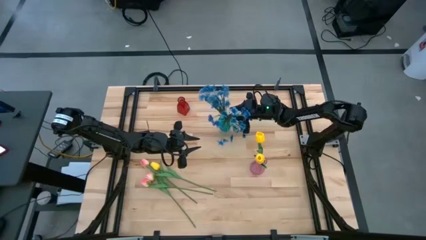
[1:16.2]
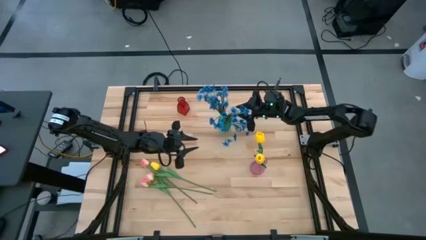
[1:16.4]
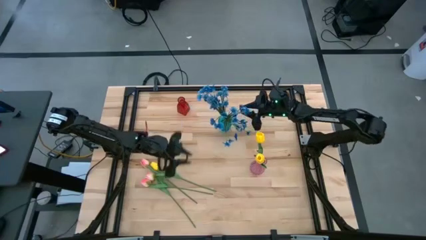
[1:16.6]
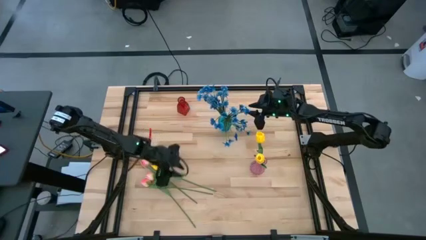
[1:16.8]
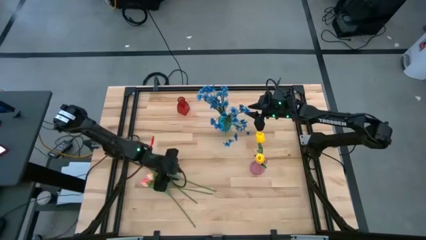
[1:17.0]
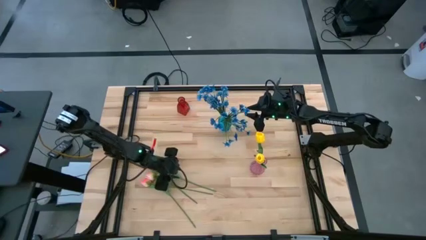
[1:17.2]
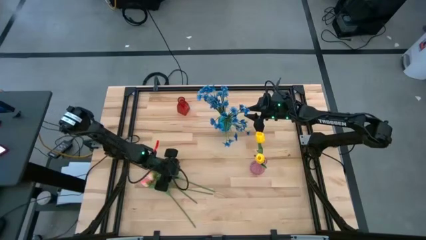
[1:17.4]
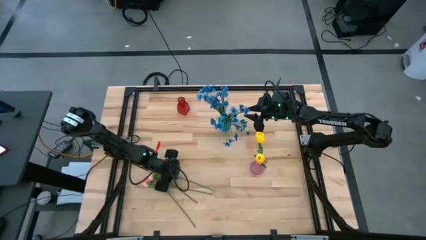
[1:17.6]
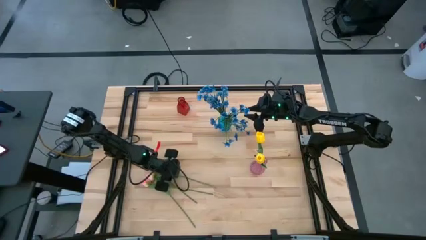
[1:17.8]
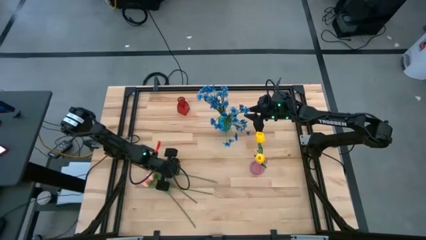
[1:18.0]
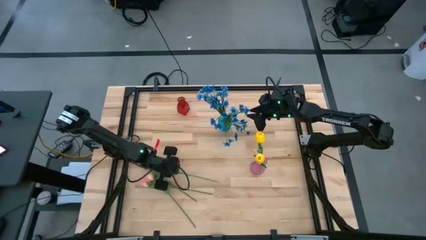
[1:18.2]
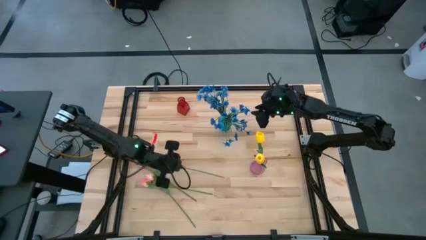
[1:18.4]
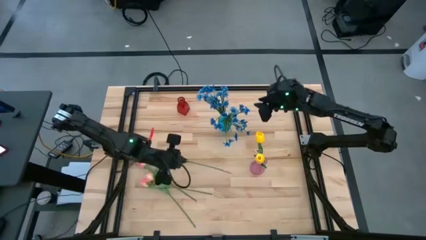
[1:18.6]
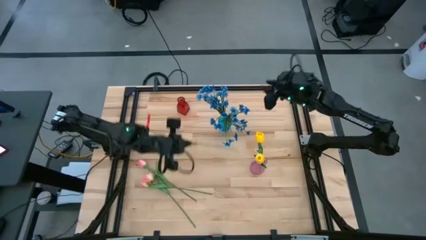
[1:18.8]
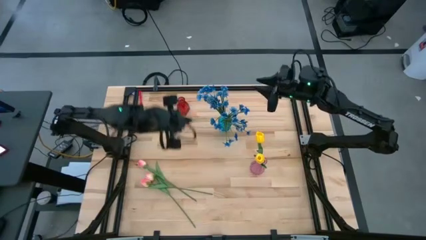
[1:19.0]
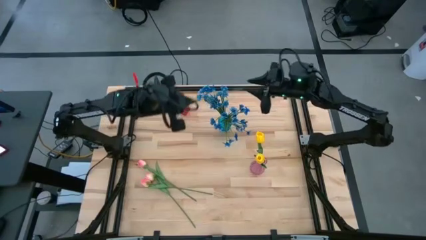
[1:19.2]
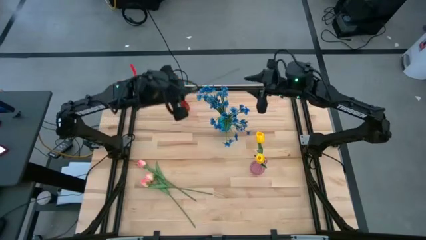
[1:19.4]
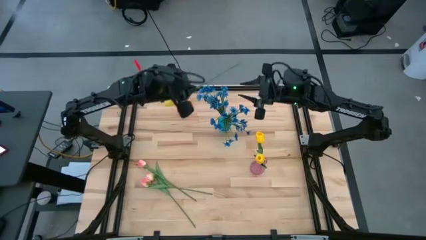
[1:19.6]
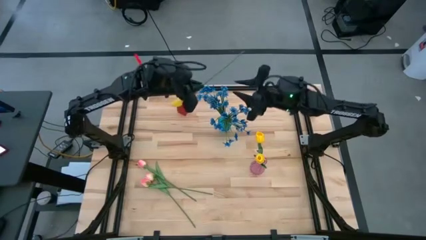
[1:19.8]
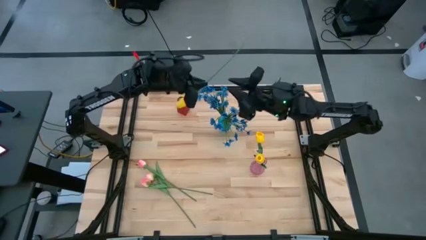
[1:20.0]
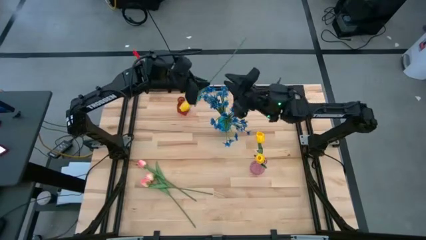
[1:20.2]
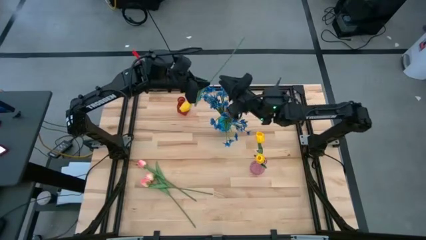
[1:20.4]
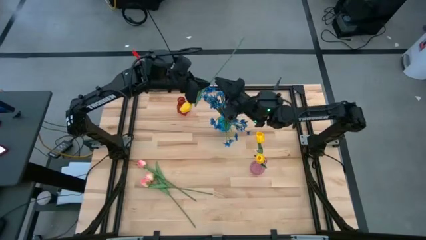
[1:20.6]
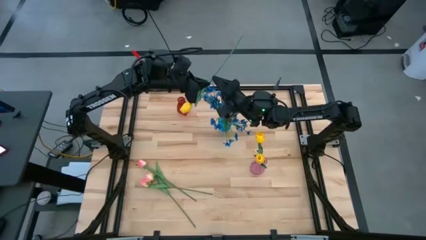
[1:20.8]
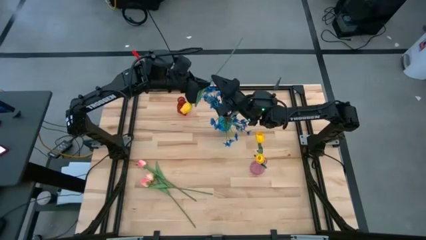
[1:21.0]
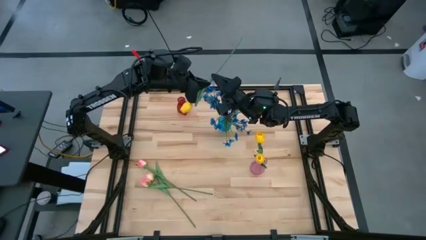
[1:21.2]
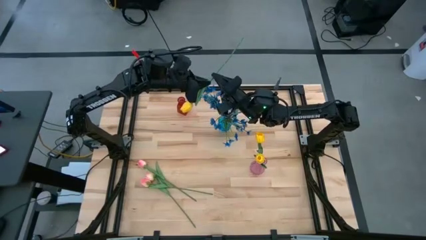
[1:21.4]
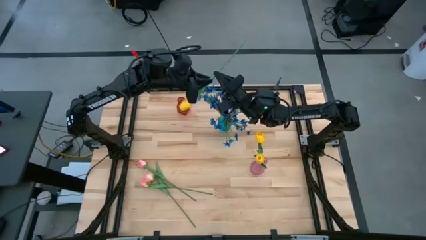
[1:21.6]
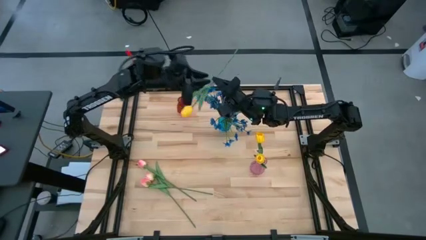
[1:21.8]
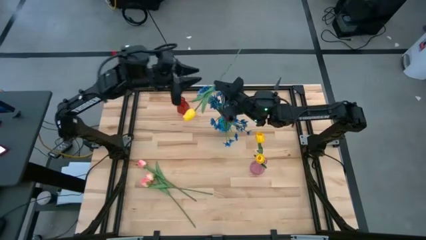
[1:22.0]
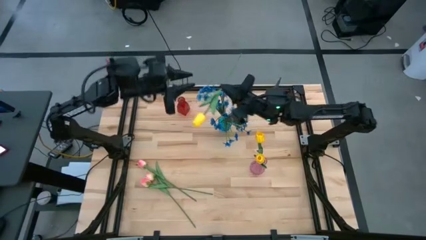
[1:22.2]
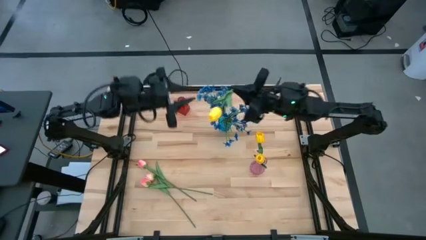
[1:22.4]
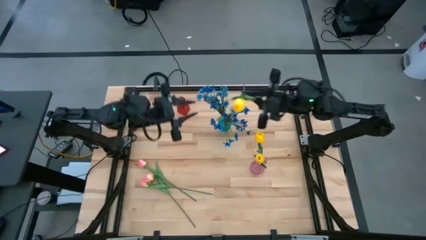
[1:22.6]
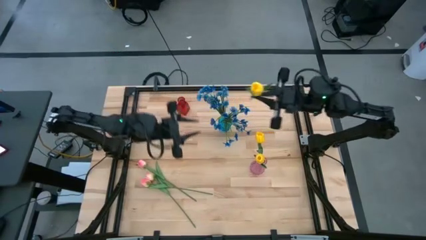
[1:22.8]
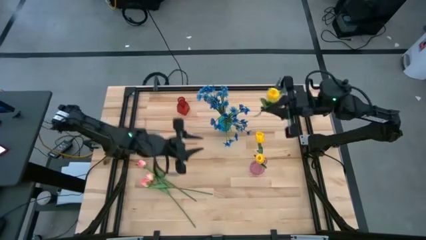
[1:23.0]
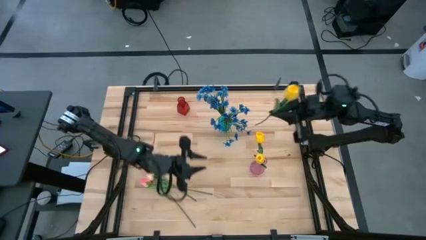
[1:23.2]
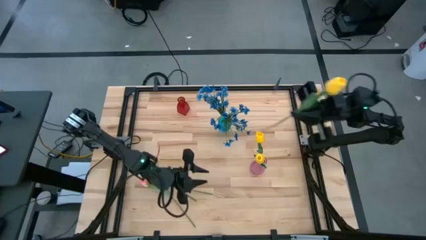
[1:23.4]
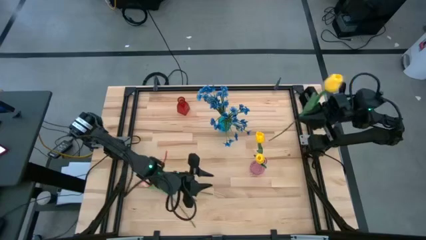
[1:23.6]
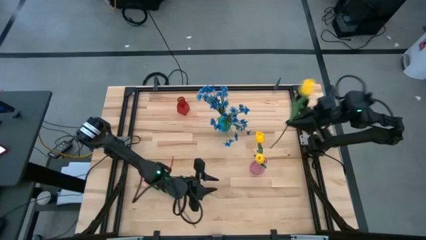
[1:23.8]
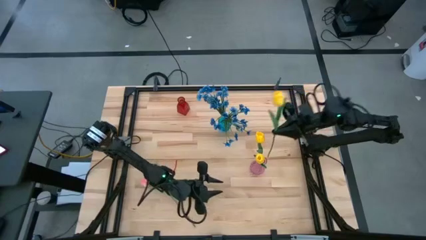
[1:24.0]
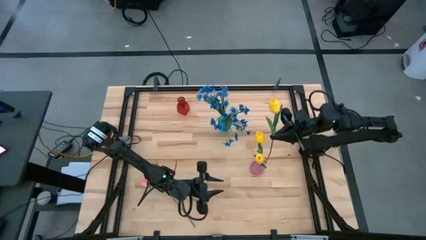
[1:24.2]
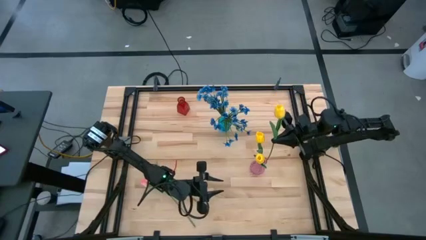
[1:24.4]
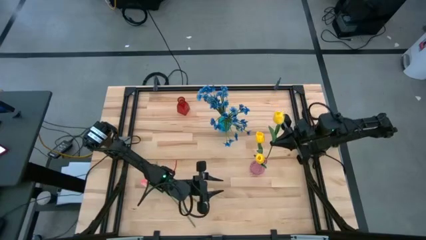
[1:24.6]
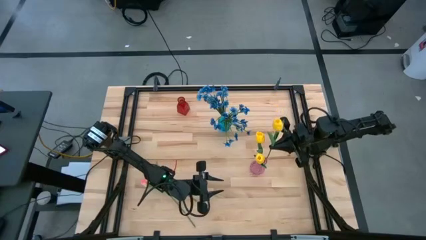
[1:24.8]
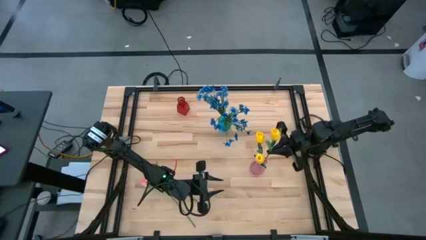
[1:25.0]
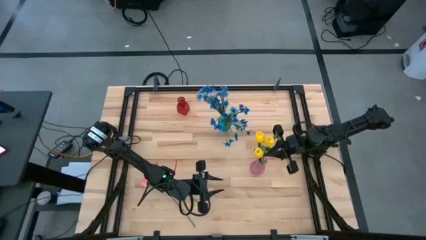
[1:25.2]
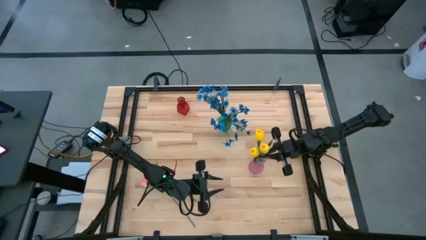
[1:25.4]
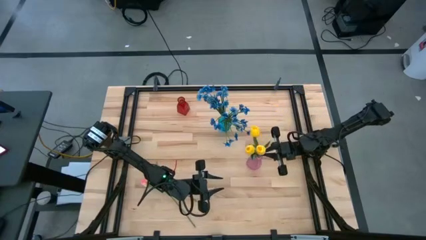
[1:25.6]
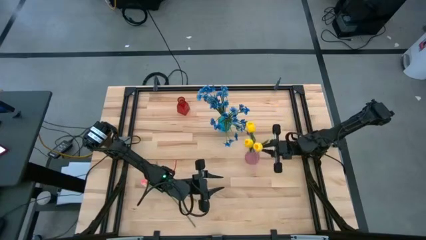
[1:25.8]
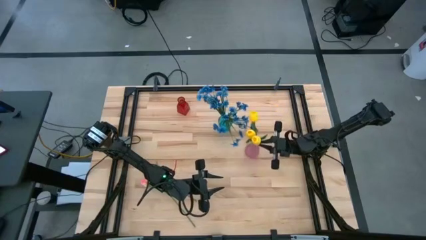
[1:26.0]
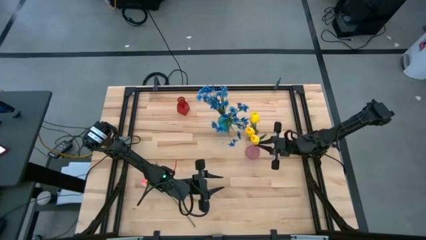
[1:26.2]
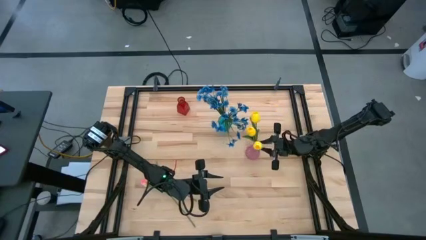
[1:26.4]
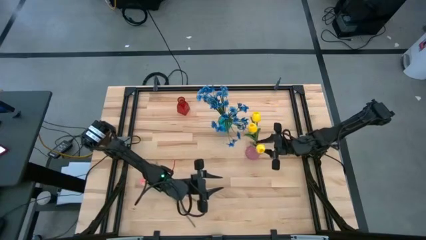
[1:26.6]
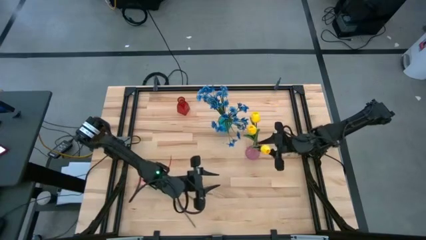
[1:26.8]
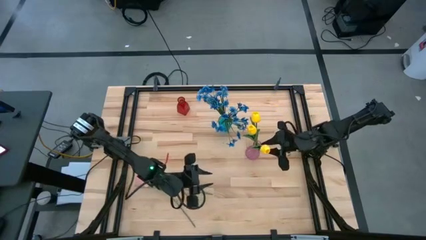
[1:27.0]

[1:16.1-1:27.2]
Task: Sort flowers into vase by color
Put the yellow tulip into the violet flower vase

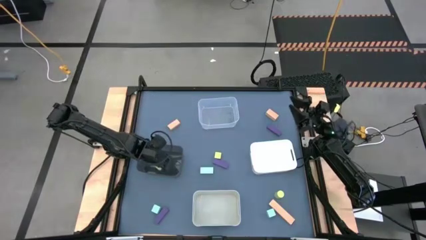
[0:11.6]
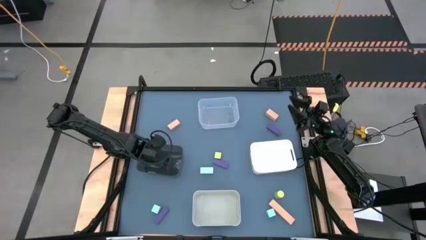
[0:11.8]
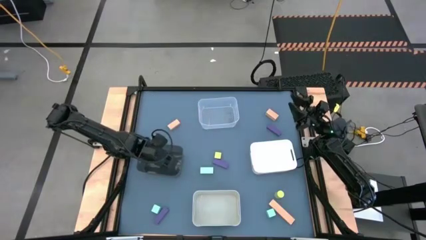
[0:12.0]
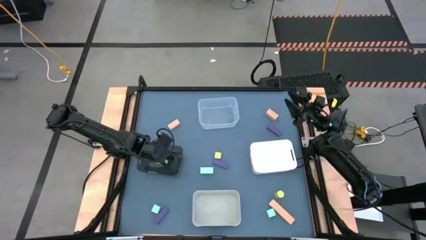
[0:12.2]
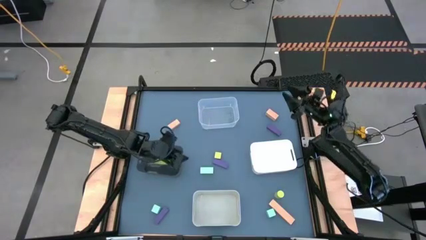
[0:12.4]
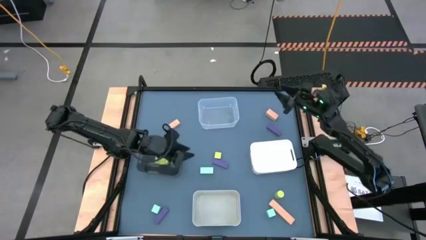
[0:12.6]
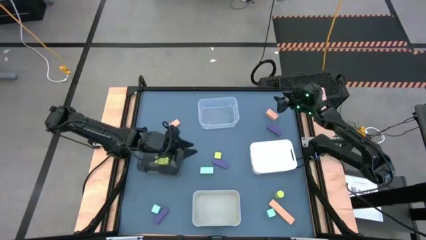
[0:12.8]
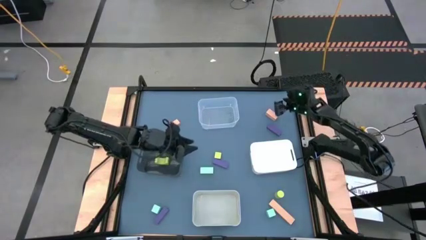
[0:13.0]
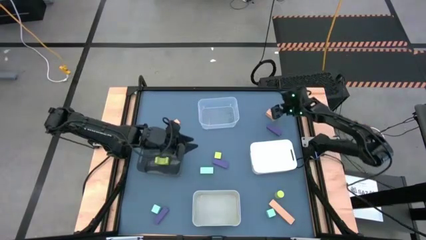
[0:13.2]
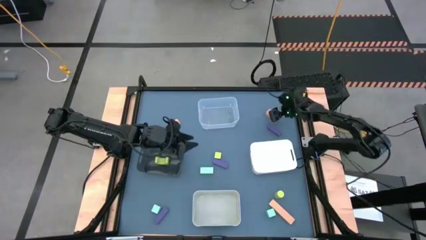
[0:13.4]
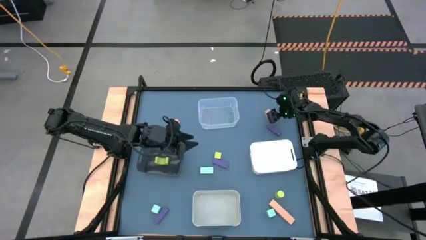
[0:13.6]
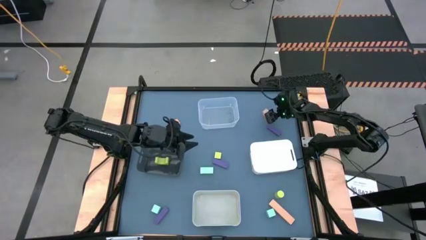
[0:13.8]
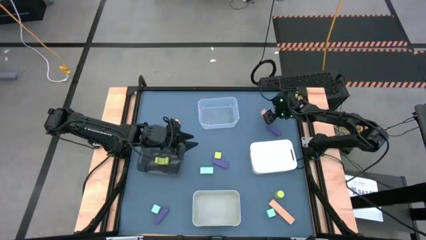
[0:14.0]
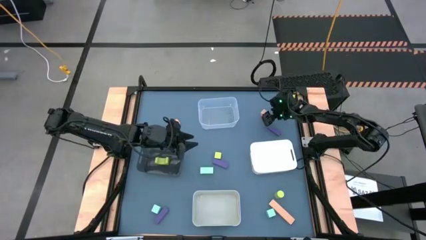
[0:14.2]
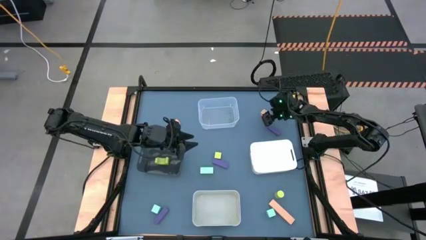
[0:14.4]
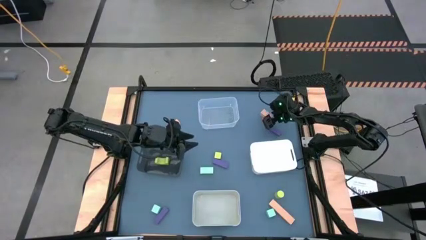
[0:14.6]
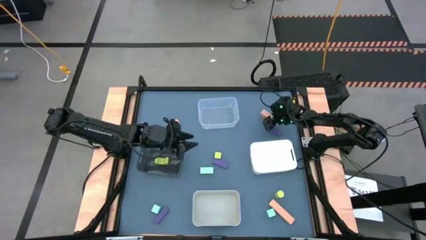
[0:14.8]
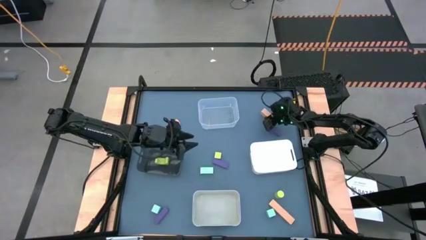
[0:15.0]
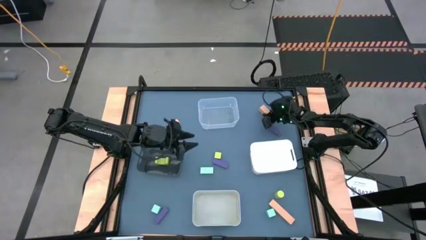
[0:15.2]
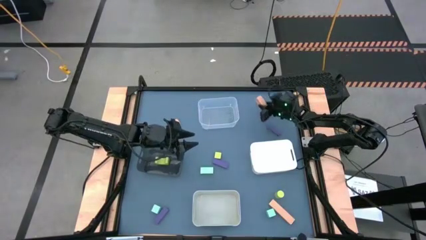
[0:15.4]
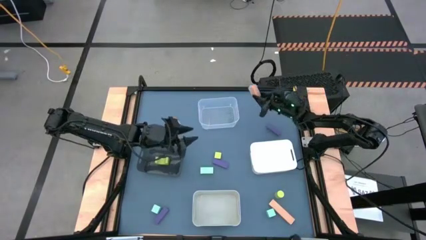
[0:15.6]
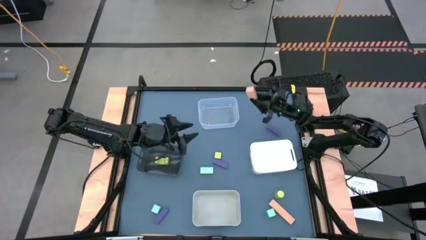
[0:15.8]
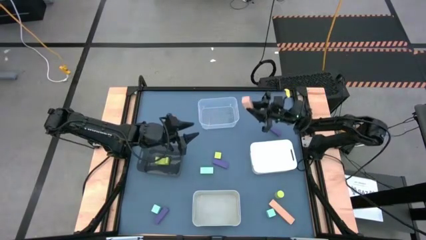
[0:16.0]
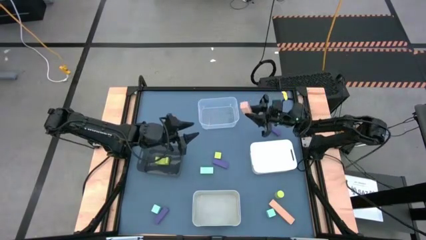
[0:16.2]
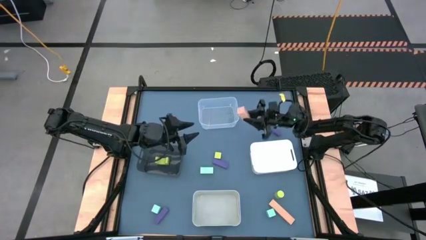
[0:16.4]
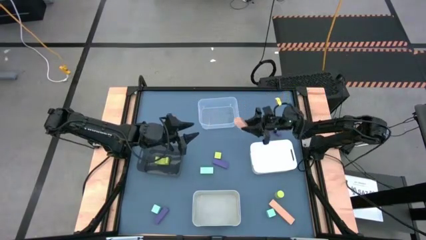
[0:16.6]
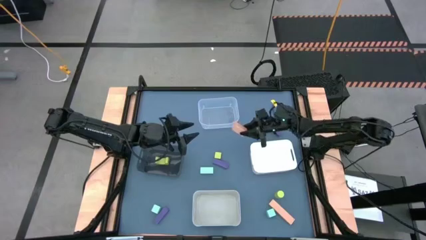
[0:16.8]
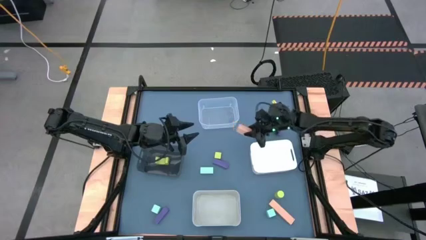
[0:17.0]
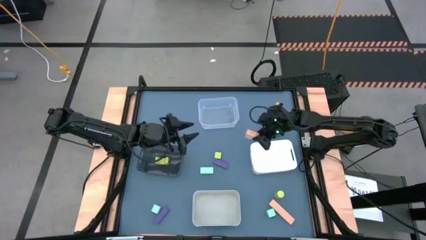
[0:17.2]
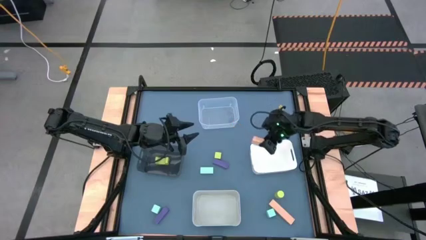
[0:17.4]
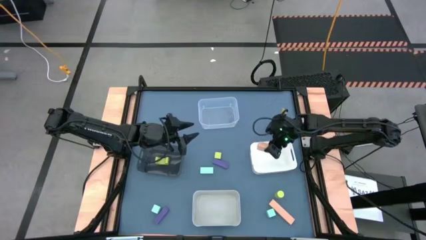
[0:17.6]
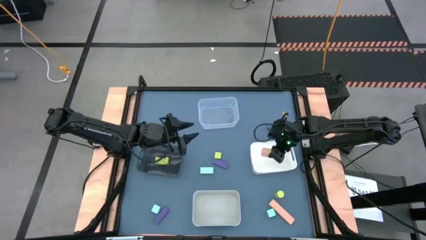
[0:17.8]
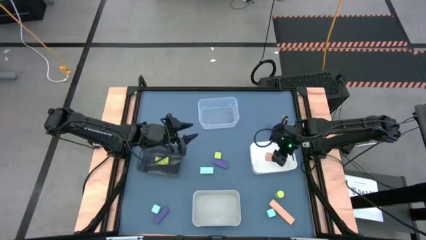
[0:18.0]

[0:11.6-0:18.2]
Task: Sort & place blocks by color
Put the top right brown block into the white bin
